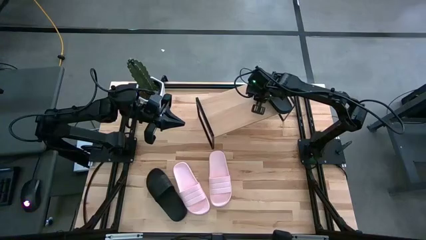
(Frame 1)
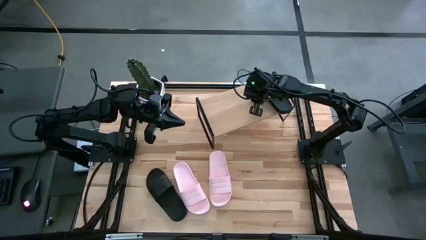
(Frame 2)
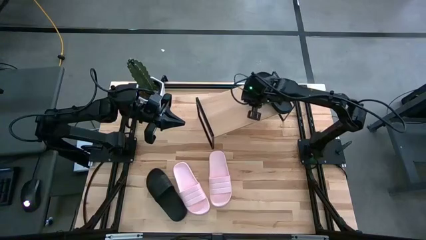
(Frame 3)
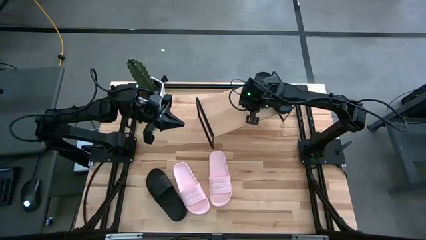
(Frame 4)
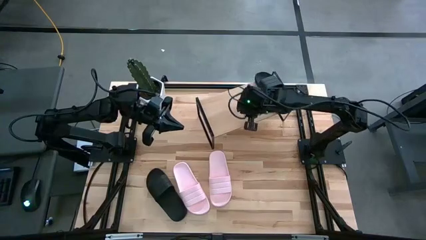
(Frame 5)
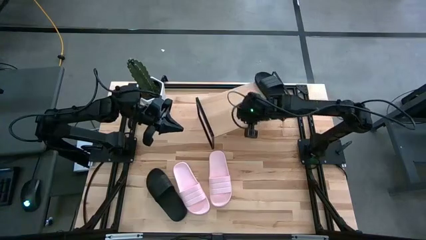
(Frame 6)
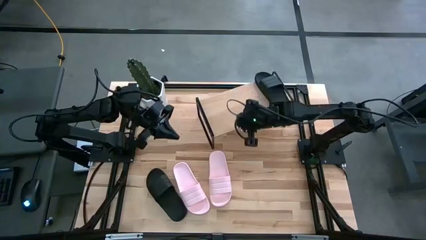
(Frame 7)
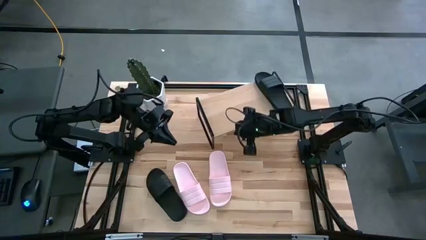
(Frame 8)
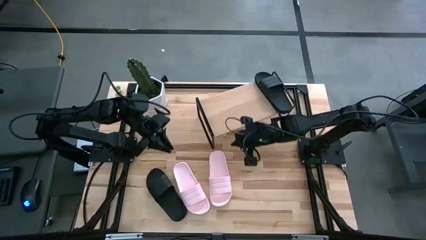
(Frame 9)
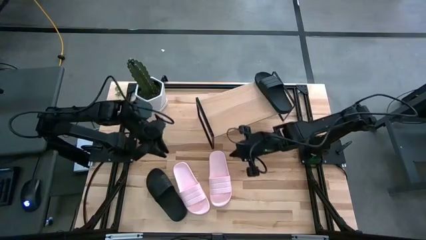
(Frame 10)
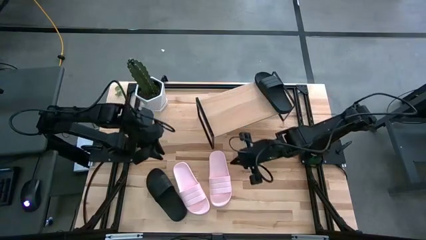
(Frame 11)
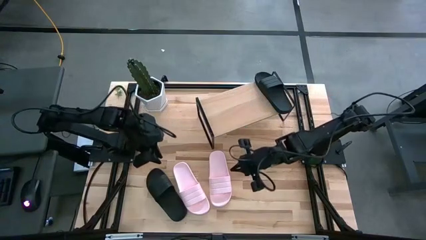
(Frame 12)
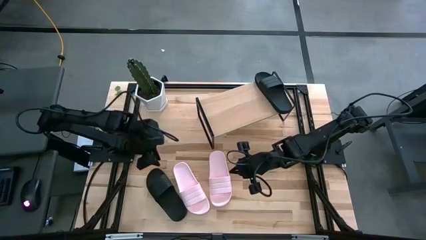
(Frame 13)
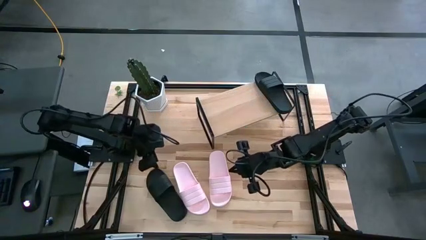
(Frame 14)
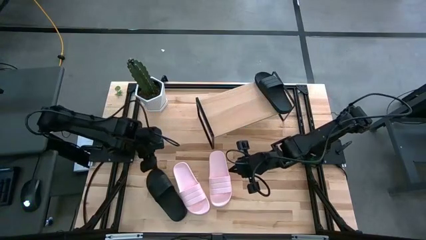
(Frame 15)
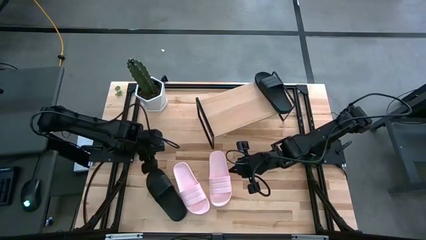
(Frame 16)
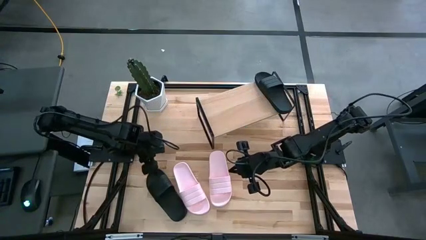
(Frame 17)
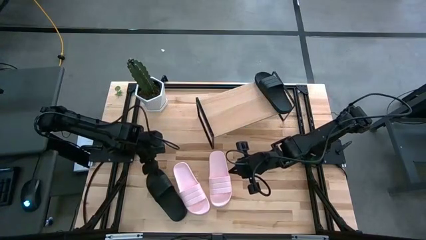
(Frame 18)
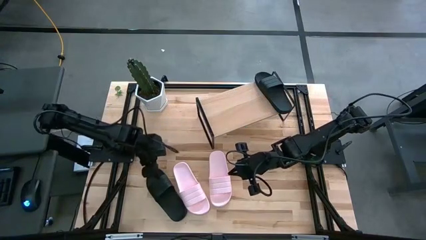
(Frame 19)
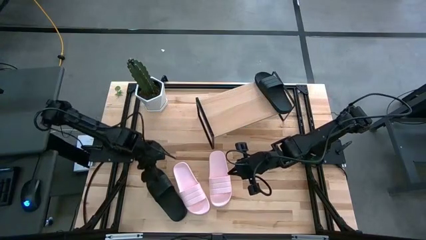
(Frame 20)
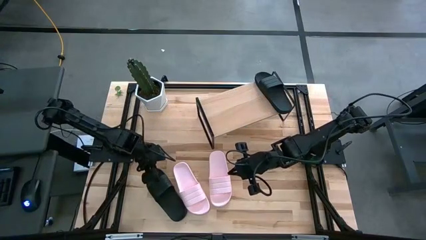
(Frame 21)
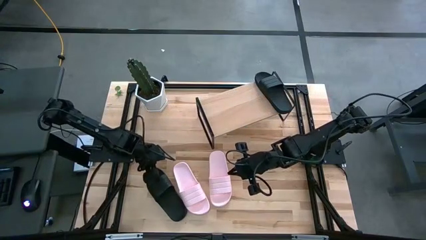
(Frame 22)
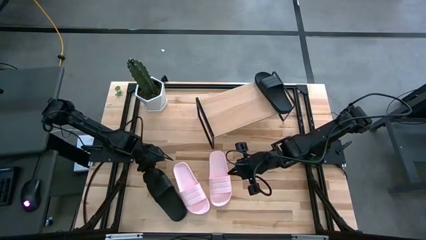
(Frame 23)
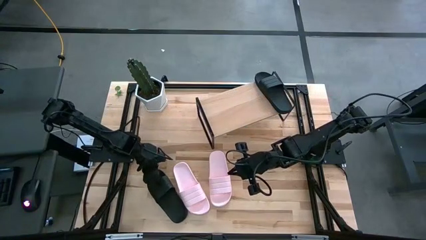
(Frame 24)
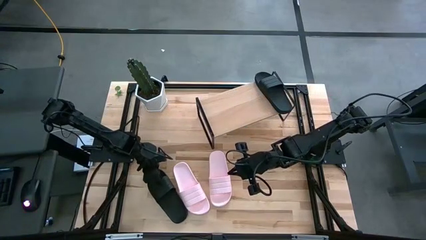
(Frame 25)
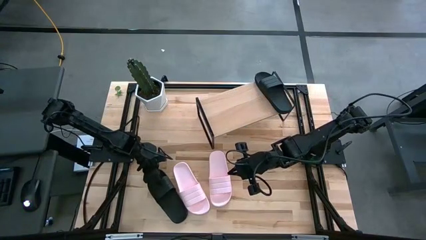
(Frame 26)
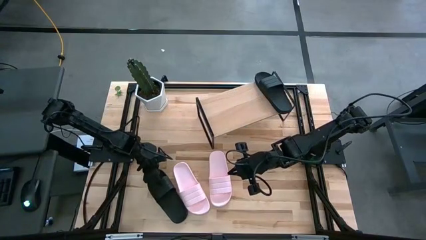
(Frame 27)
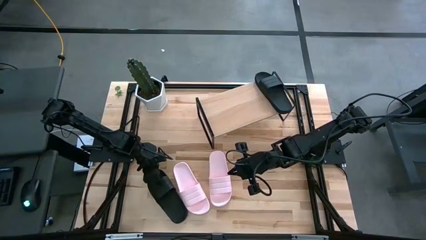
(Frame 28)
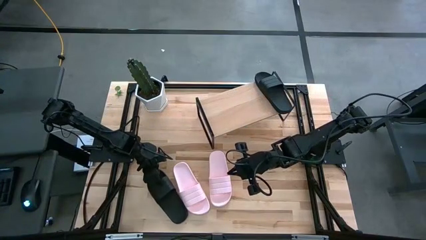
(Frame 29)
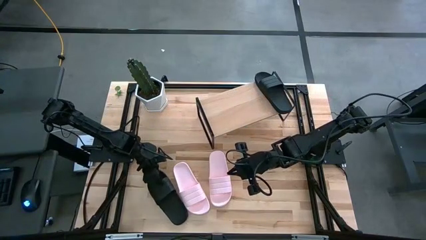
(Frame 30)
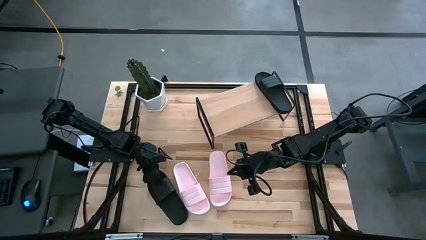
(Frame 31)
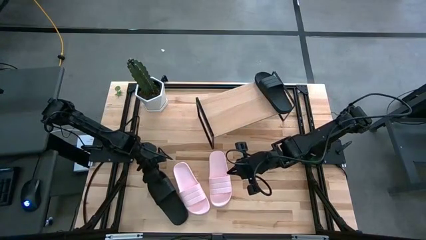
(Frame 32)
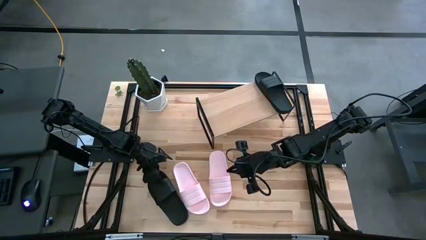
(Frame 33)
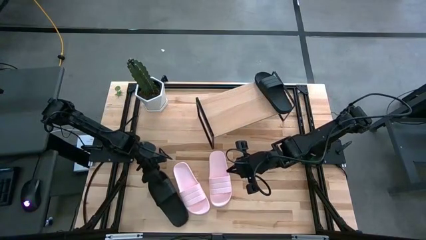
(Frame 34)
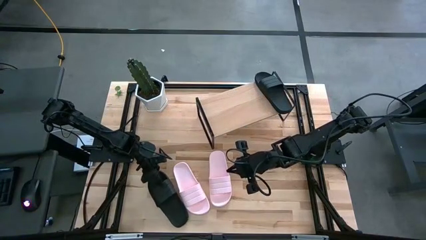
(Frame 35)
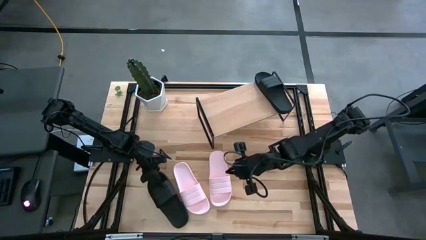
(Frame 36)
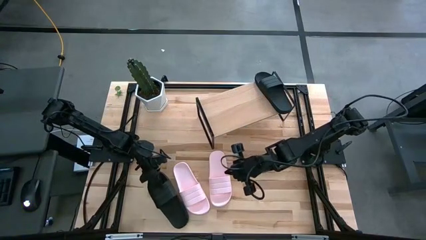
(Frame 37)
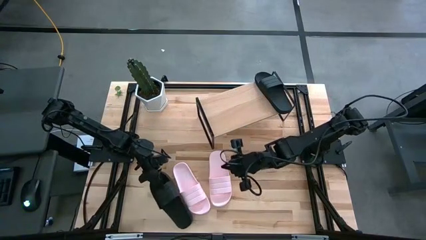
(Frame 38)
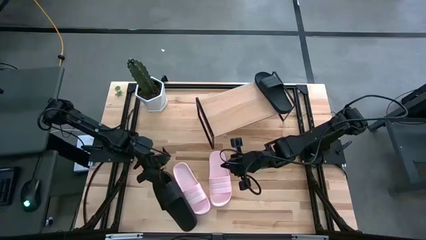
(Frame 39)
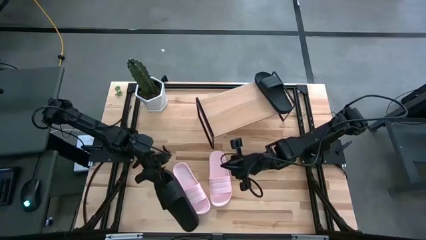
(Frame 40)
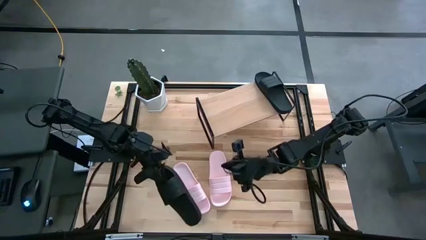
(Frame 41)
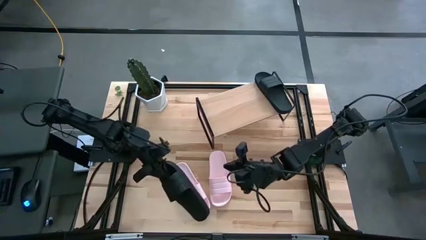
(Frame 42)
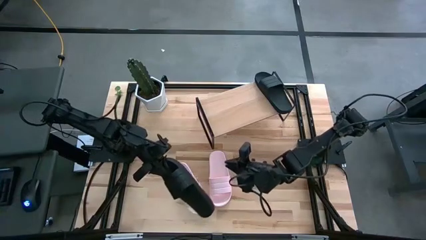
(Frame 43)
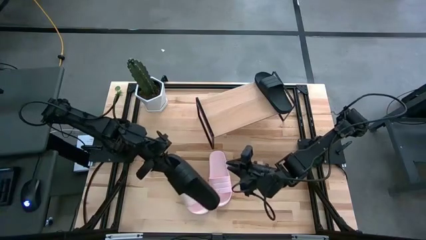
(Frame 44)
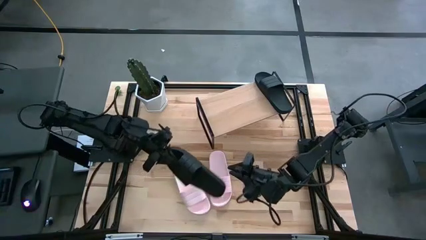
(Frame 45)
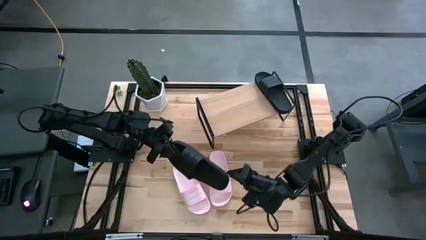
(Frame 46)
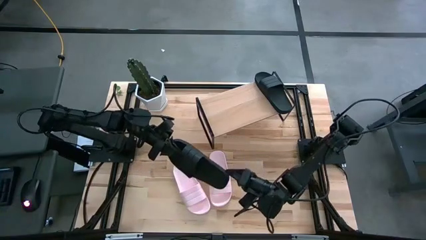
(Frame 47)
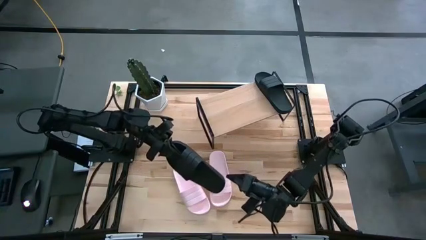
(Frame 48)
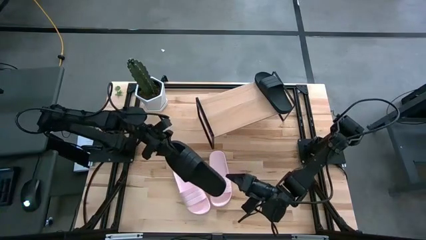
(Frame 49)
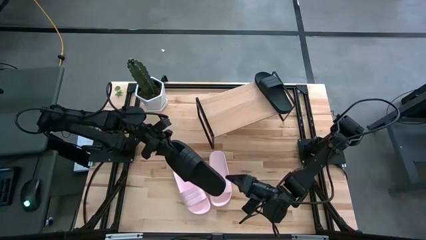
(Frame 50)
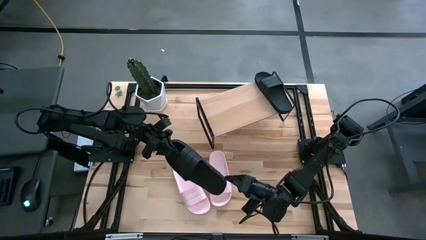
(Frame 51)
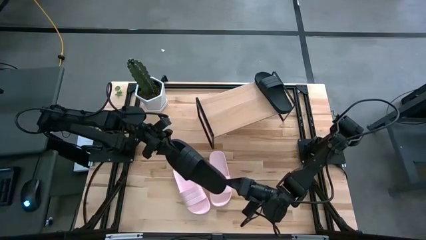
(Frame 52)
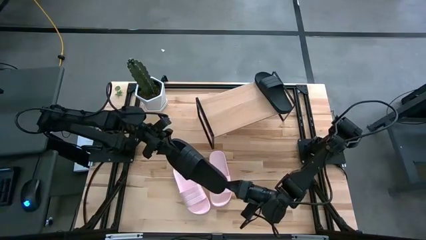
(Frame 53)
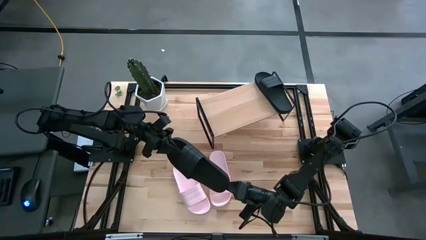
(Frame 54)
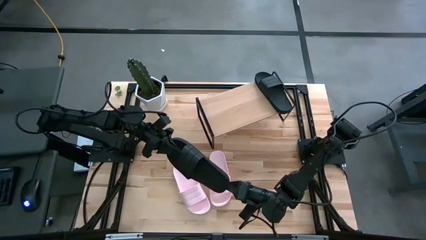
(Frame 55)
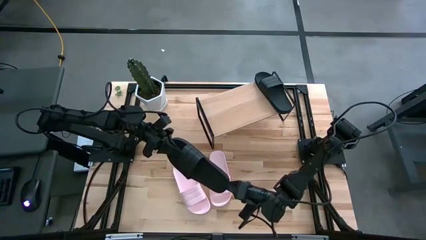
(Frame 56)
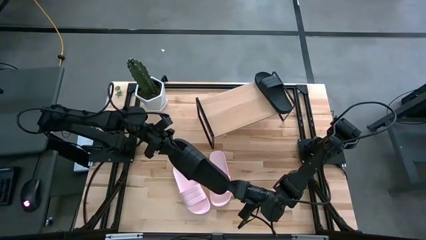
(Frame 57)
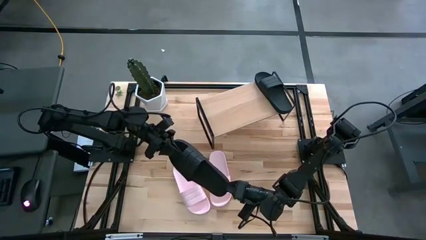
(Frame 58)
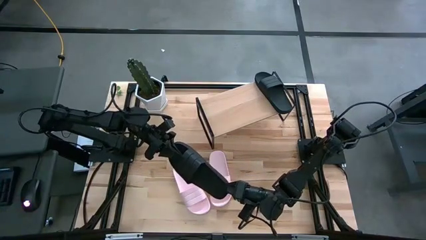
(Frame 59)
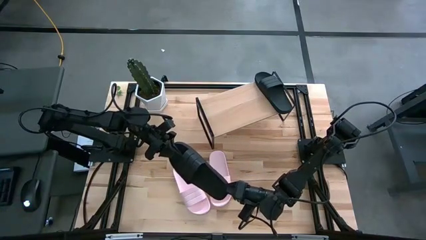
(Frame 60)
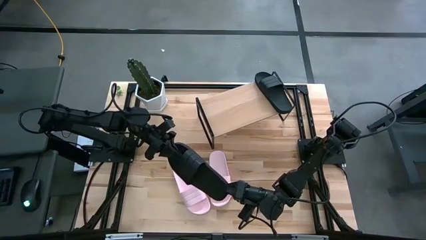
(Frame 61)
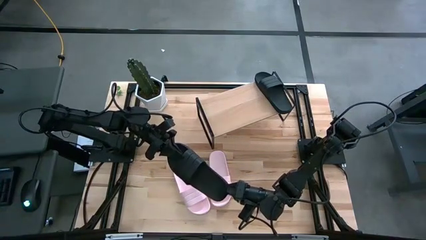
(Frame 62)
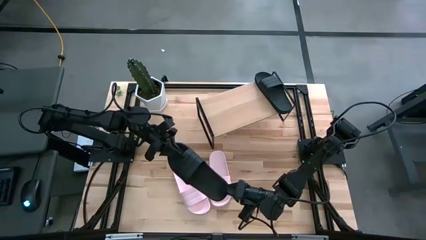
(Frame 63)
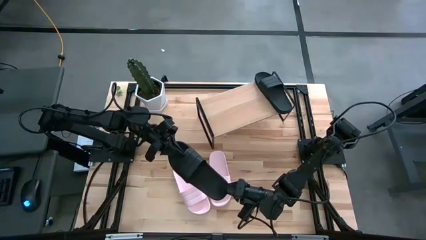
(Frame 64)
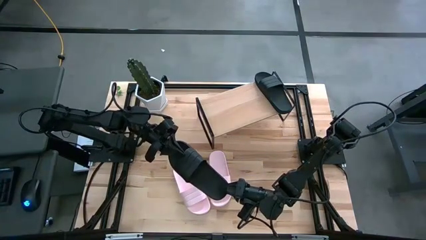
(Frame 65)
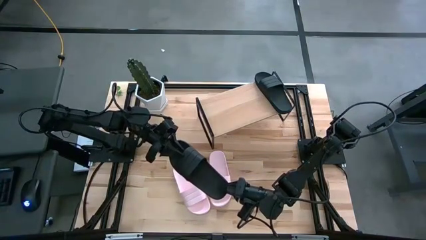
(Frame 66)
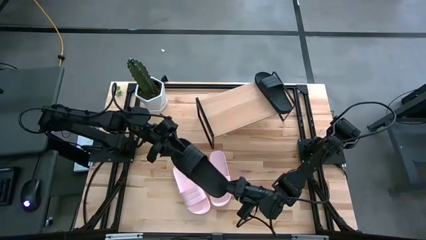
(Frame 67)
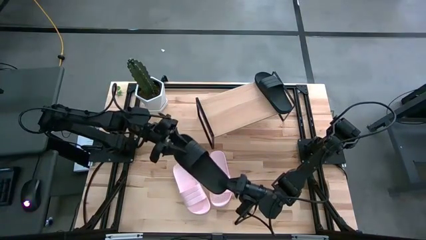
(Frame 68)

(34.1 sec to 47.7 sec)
Task: Pick and place slides into the shelf
Put the black slide on the shelf
